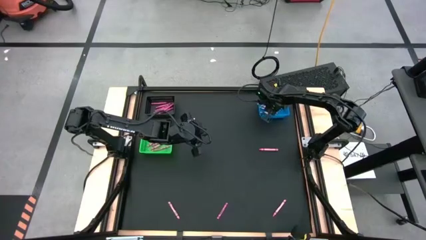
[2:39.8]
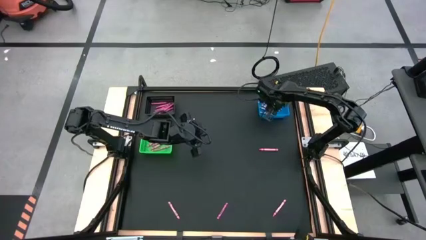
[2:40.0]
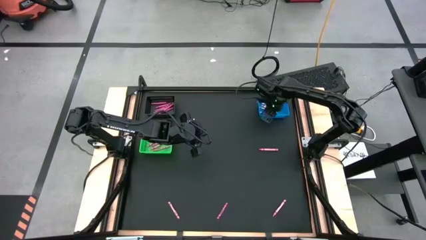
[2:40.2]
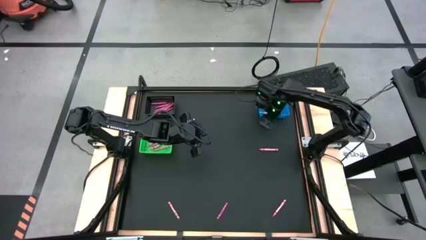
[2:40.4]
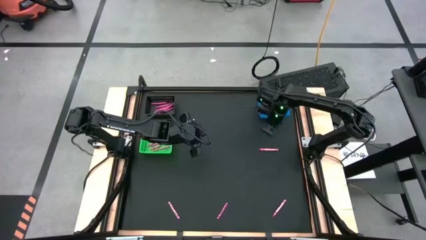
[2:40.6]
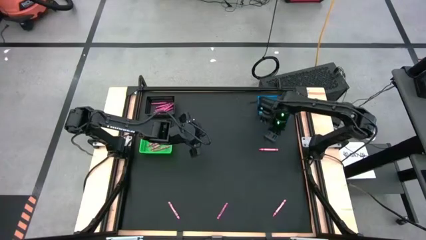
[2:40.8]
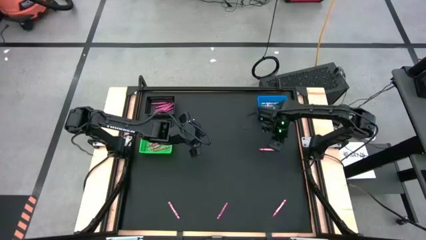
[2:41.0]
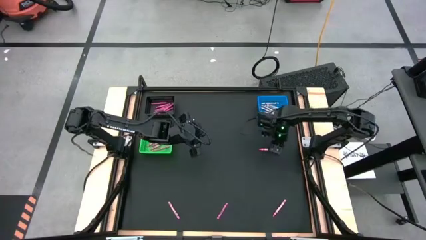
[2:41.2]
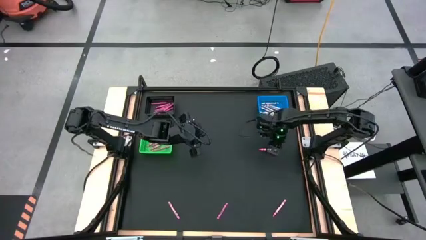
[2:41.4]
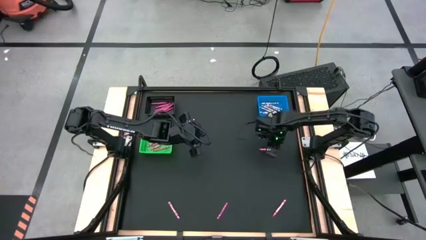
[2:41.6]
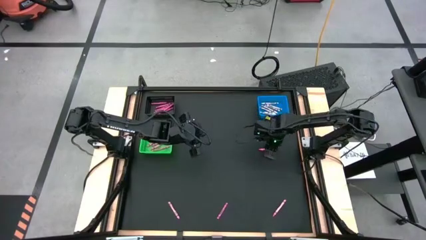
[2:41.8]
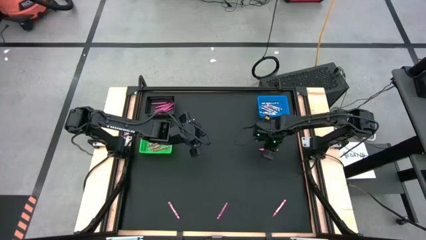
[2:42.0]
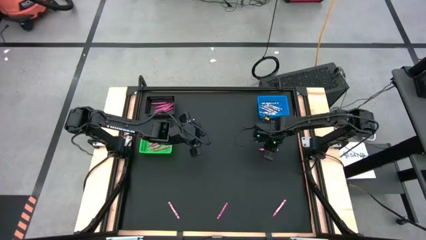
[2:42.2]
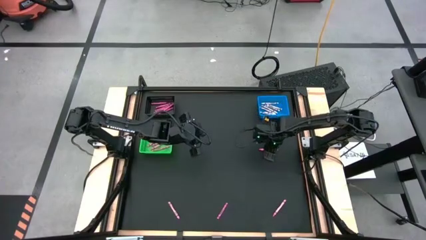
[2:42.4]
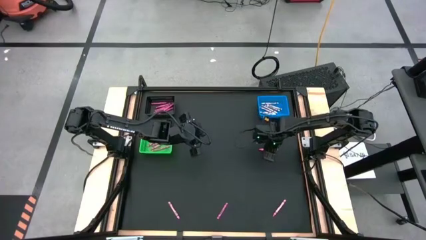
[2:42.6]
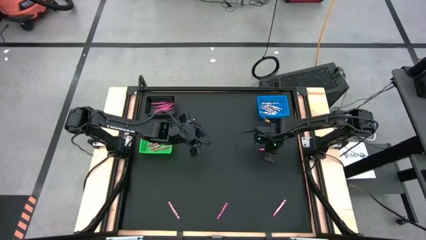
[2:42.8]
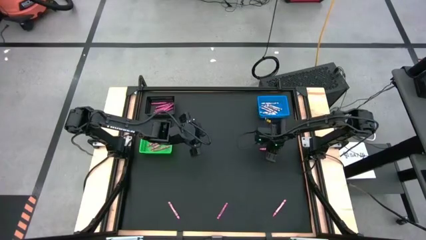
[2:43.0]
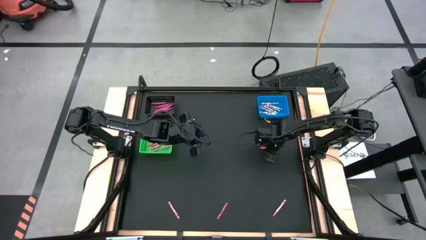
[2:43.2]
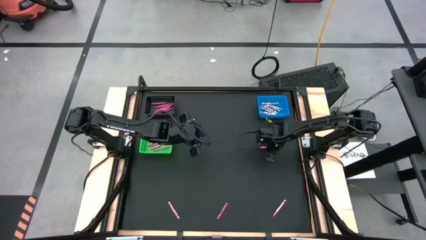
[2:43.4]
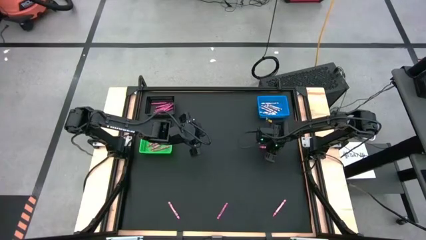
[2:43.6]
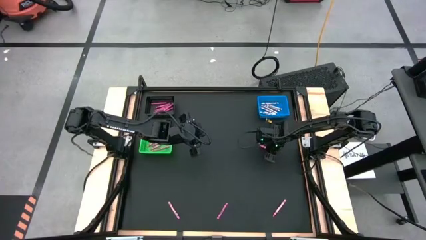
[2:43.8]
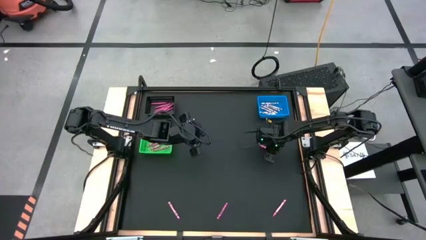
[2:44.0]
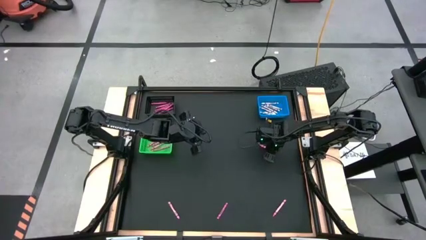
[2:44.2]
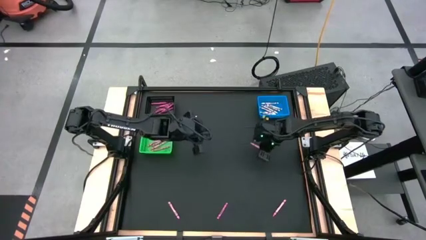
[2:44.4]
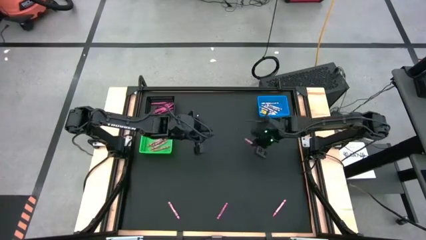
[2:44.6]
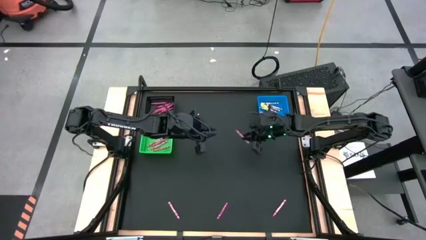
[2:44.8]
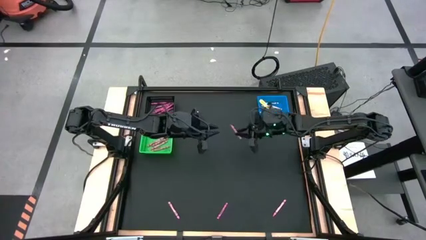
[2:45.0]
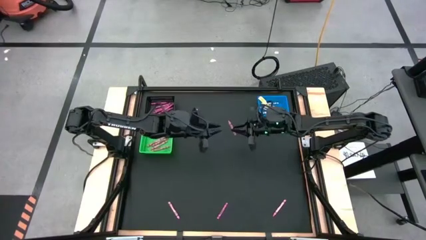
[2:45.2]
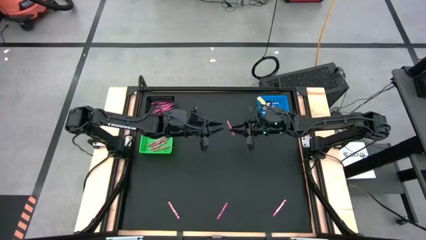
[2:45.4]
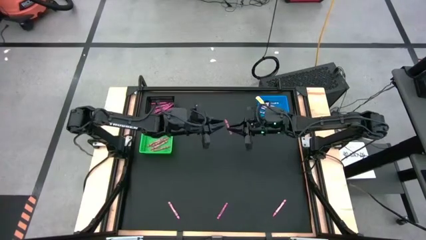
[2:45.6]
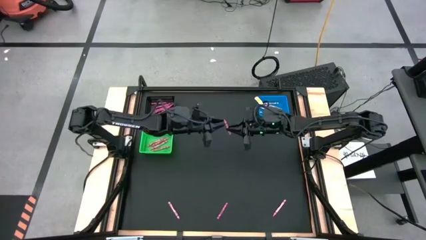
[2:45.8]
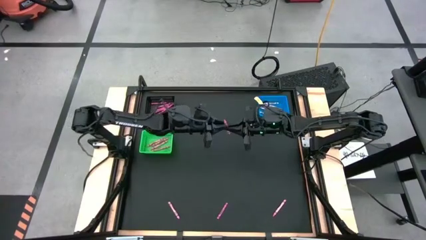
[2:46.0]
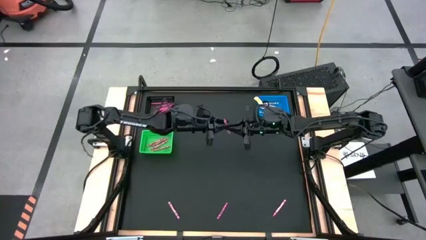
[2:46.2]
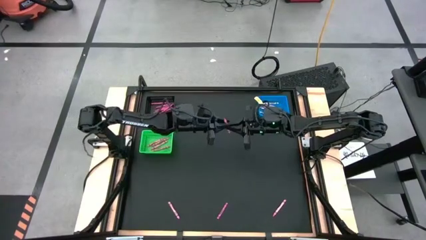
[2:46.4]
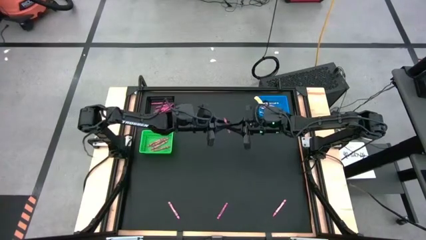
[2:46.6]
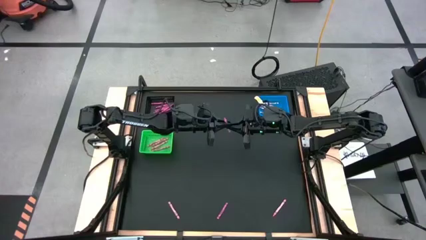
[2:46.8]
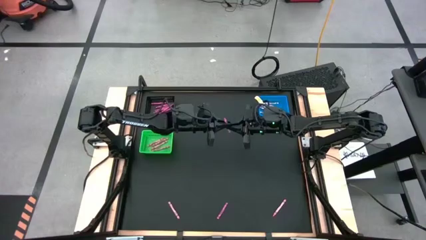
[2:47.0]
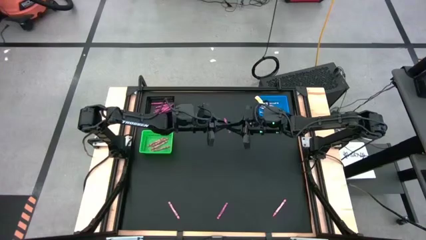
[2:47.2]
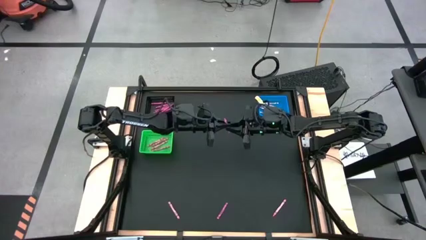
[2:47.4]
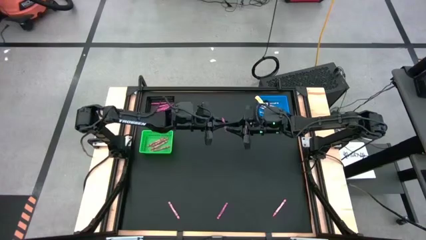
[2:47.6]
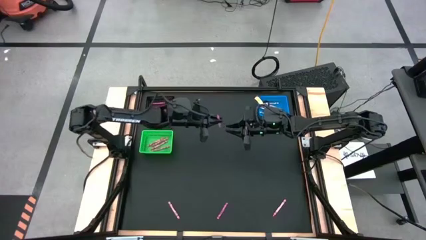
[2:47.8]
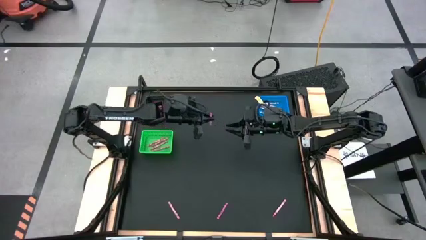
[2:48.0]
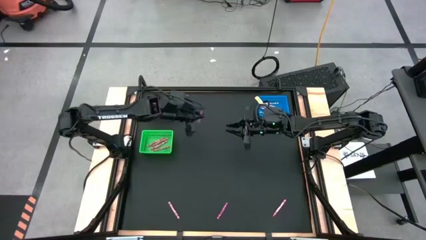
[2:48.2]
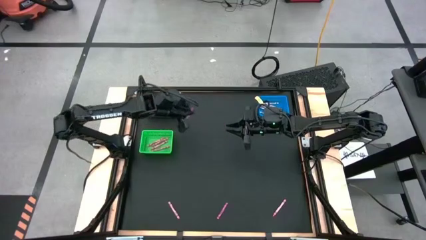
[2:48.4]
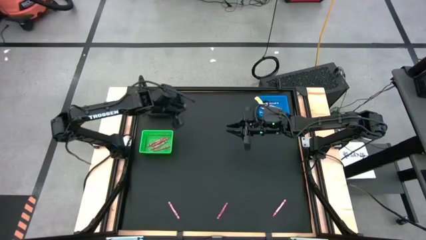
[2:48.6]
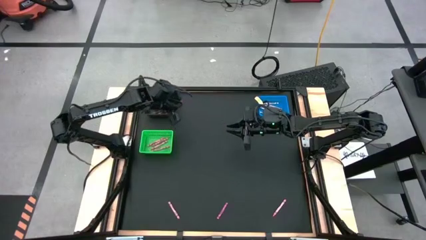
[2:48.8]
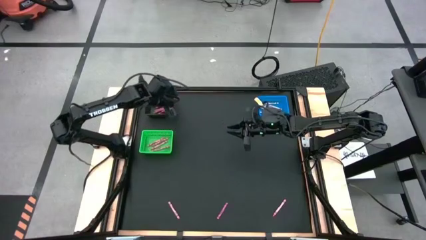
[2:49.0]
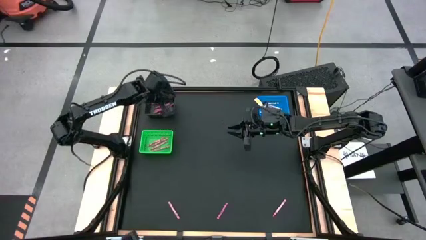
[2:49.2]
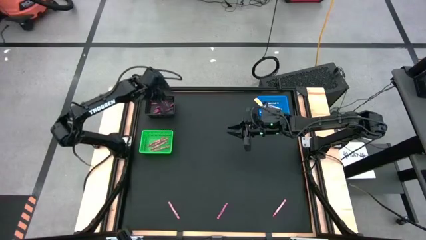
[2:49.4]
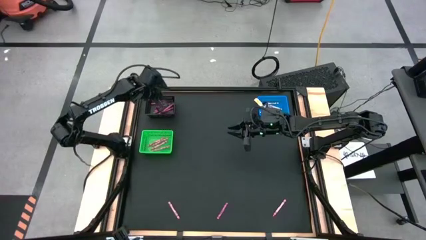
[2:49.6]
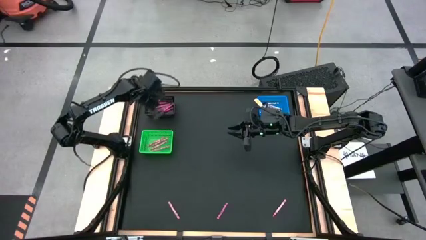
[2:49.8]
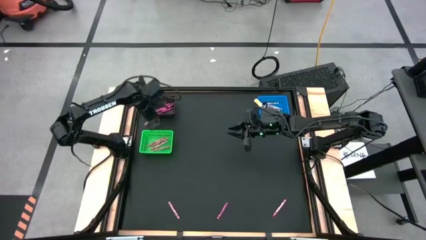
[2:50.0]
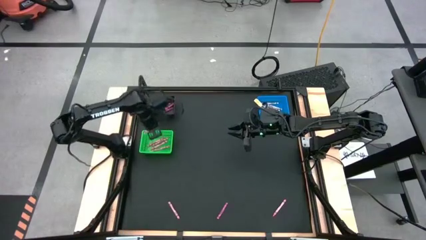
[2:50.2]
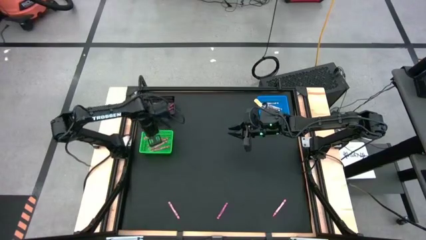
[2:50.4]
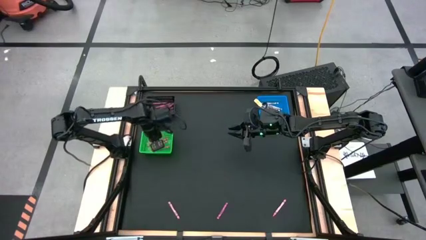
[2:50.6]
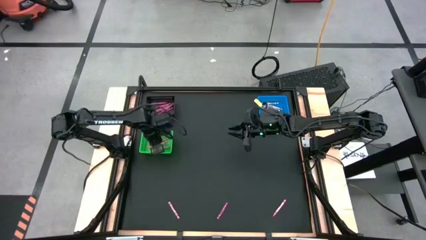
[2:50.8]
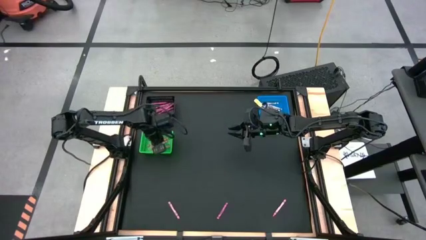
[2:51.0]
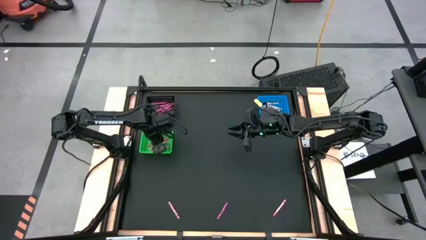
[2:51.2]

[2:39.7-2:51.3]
Task: Sort crayons
Put the pink crayon into the green bin

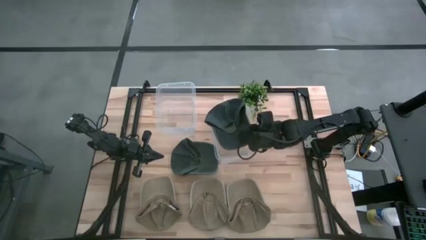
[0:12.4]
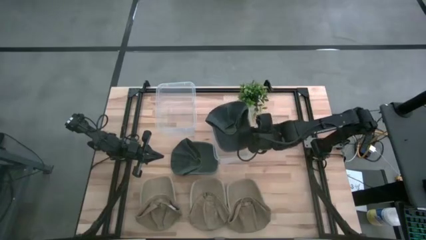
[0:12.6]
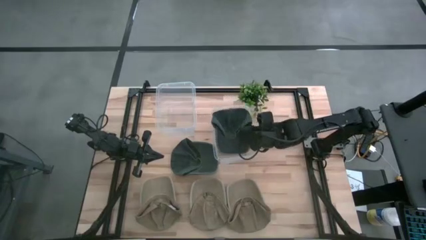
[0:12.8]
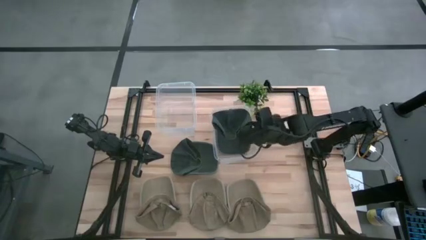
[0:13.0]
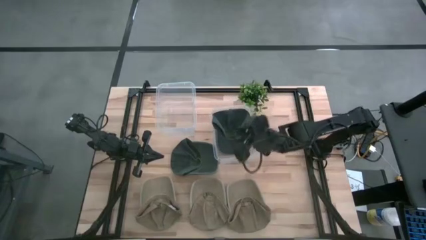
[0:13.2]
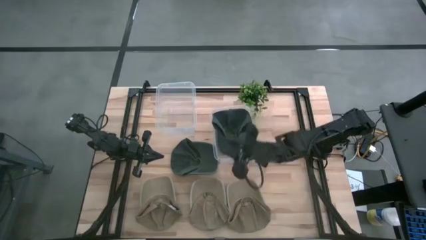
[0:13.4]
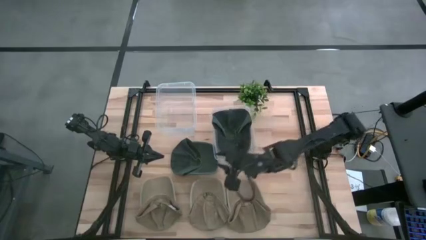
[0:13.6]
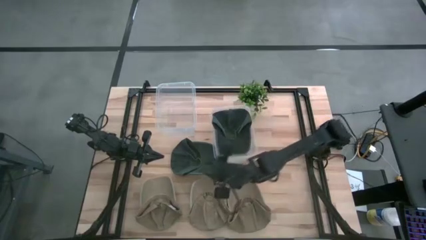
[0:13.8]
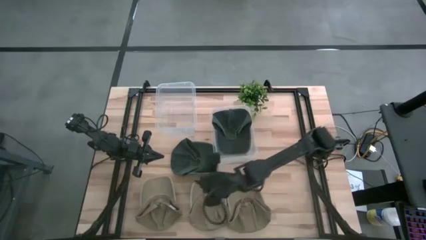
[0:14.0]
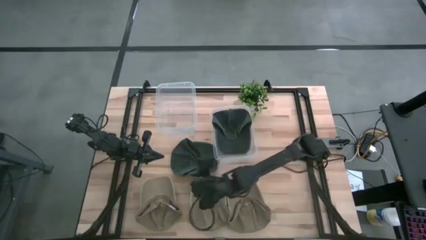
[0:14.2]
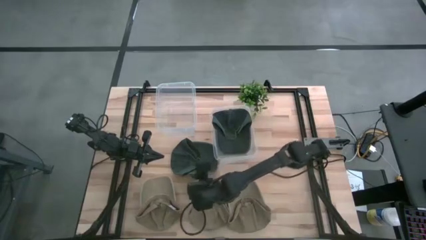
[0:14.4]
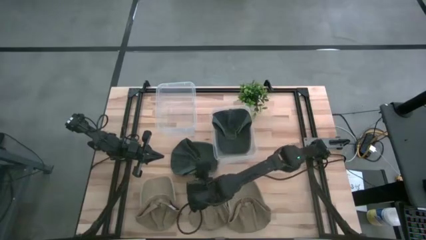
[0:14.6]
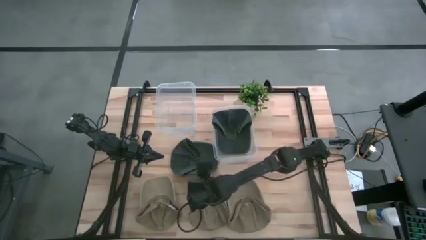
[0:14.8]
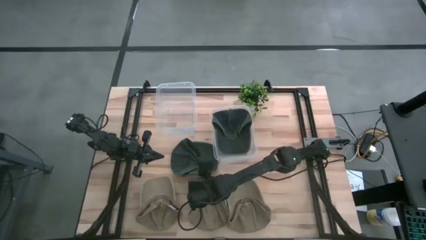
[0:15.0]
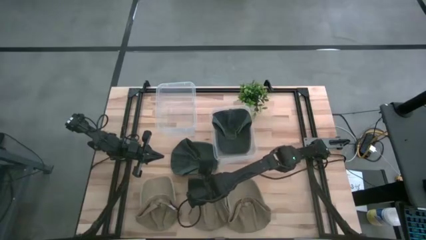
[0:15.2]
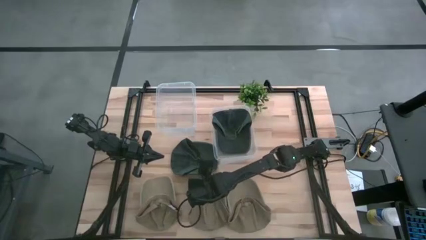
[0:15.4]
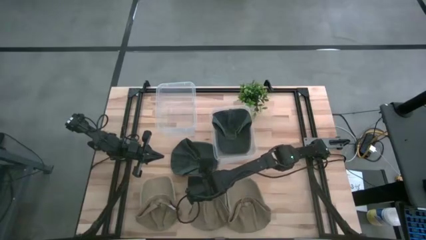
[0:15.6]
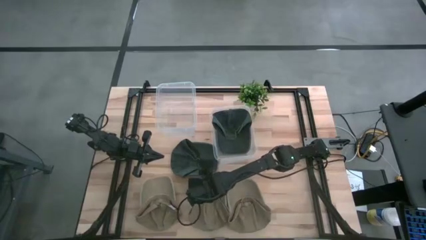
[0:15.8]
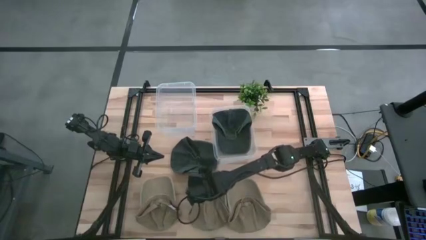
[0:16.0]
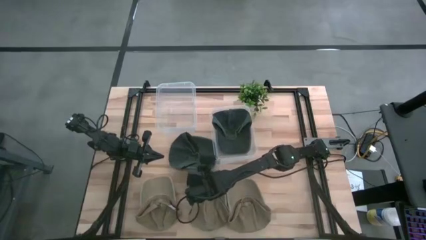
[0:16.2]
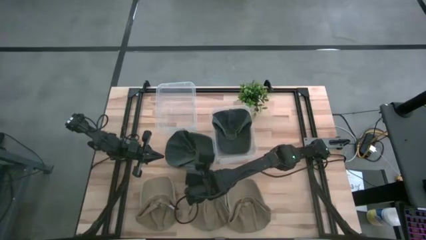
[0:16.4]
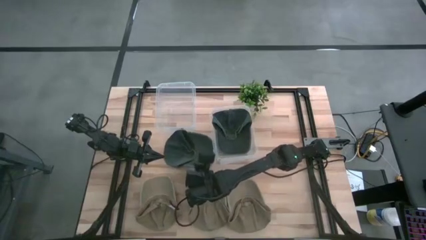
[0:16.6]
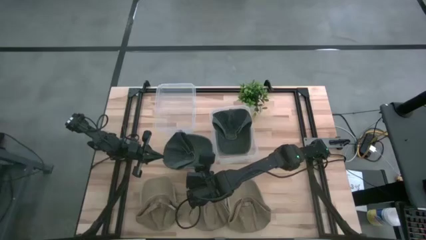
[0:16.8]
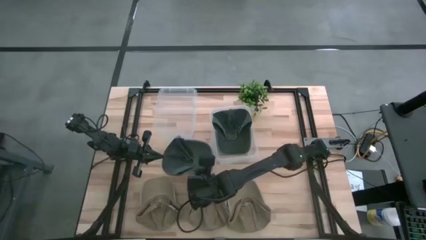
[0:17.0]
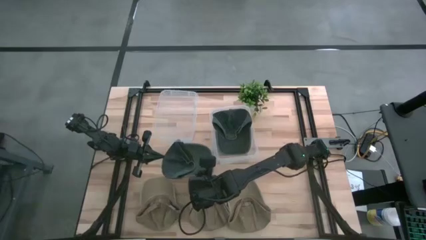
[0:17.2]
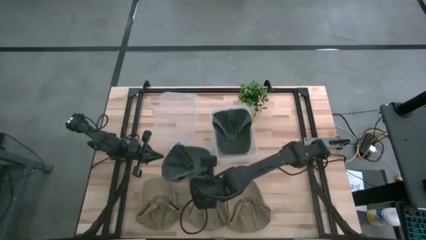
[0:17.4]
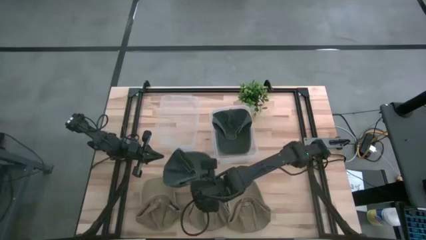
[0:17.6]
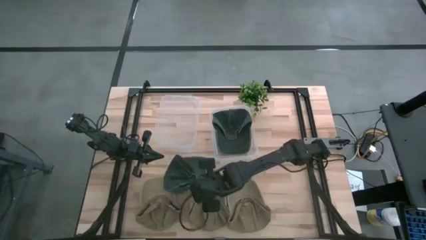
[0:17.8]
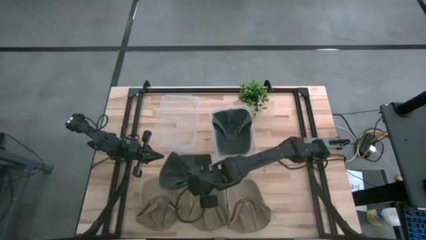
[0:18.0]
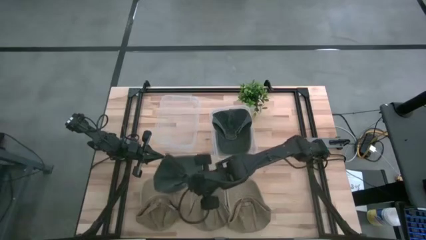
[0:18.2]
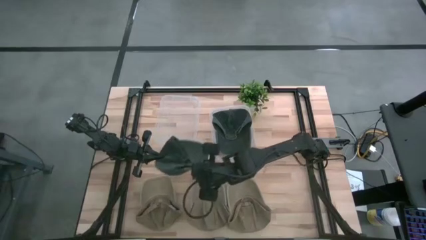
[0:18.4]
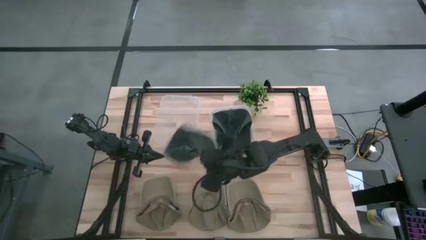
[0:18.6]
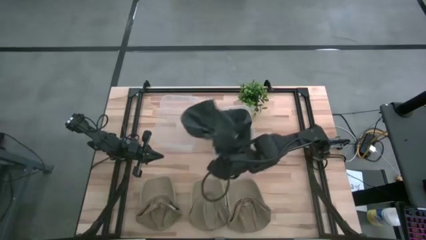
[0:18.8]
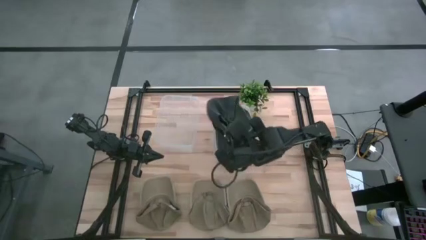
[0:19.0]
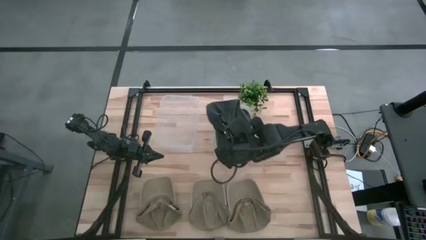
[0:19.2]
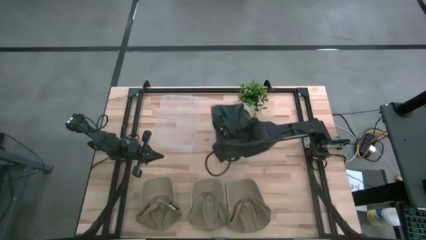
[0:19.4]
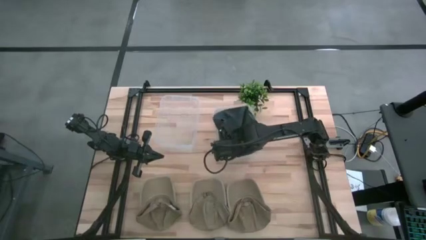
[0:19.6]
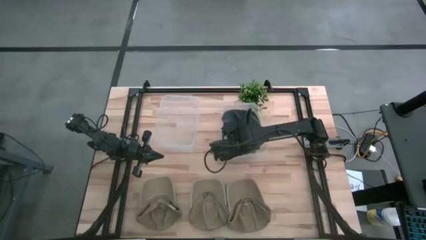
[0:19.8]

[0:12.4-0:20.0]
Task: Pick & Place hat
Put the dark gray cap into the right transparent bin
